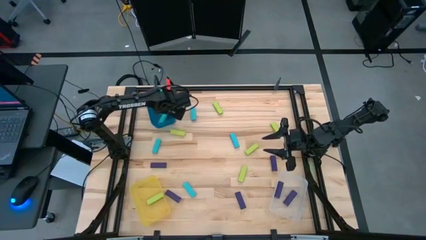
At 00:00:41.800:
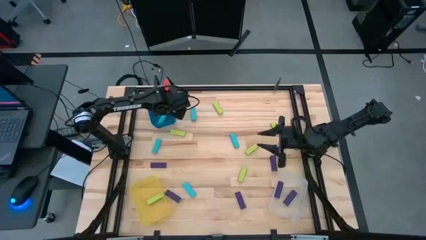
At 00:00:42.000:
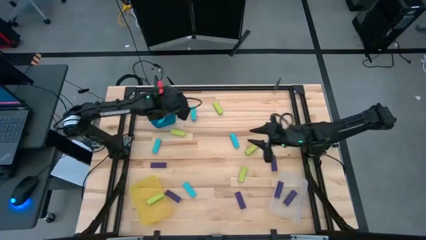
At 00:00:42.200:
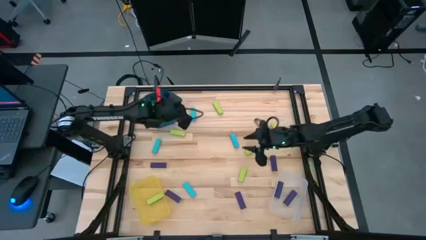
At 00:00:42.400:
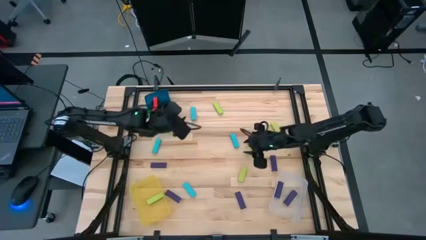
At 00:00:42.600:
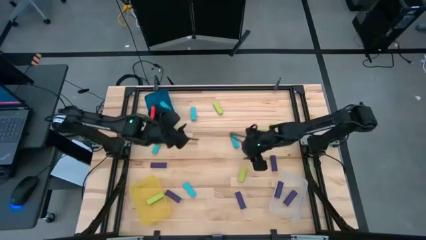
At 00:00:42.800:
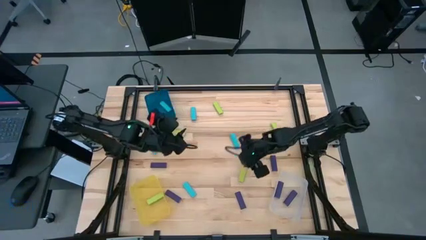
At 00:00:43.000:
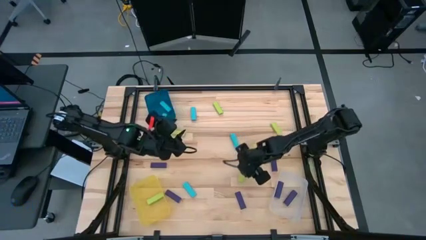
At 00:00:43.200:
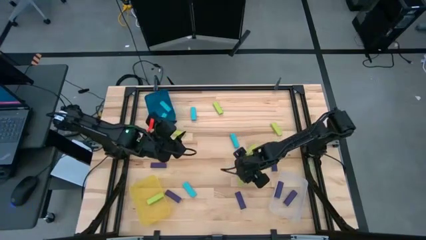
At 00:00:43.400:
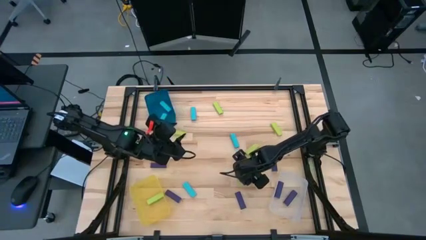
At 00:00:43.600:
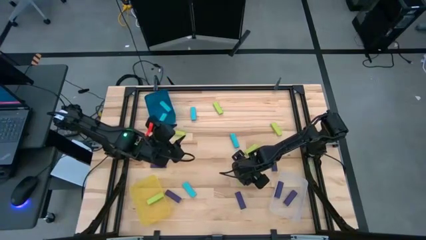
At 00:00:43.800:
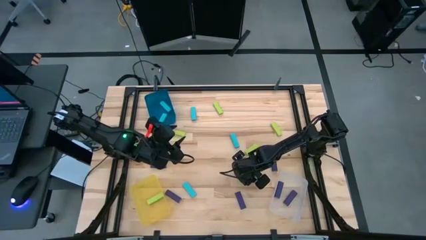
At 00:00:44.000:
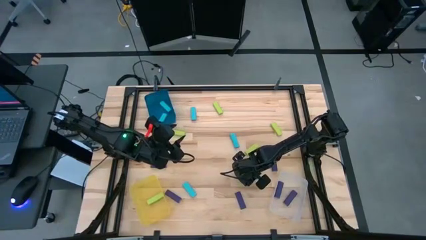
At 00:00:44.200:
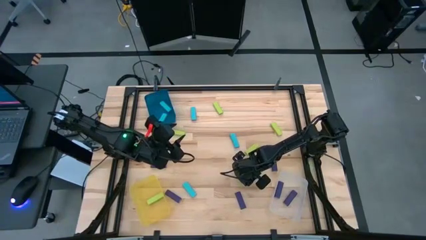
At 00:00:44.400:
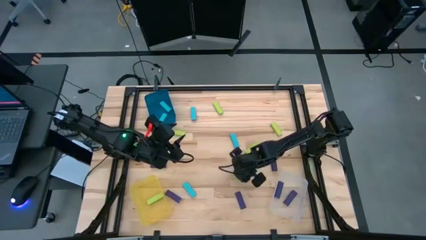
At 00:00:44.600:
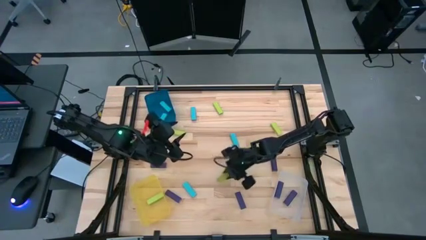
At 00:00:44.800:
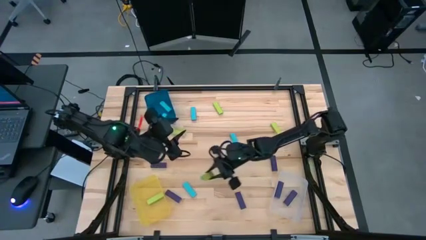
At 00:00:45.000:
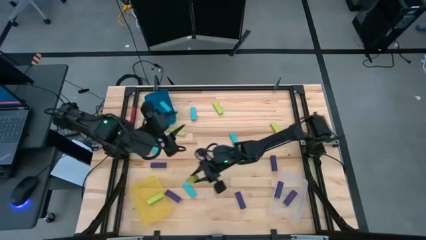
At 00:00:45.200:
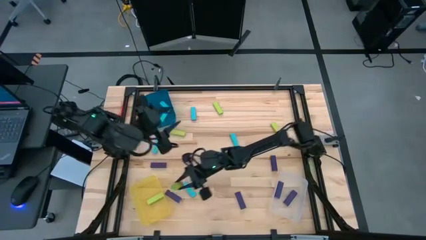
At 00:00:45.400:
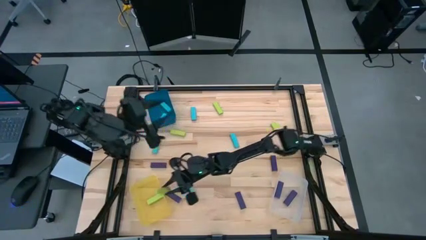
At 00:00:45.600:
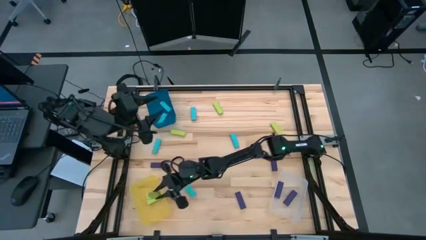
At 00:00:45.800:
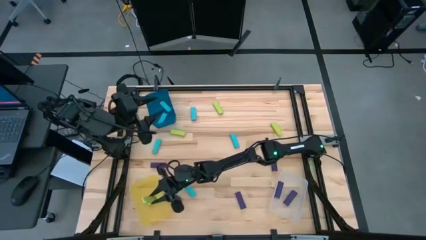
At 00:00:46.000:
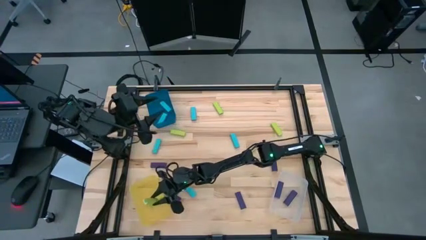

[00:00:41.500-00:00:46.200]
Task: Sort blocks
Put the green block into the yellow bin

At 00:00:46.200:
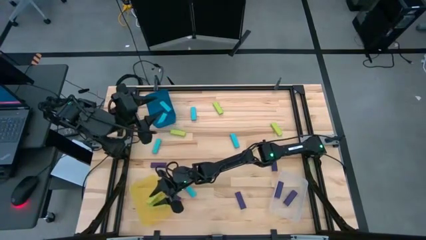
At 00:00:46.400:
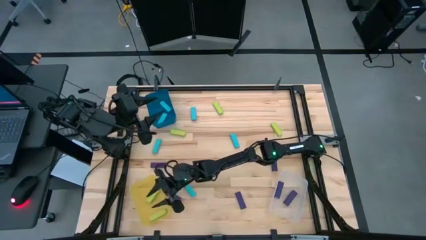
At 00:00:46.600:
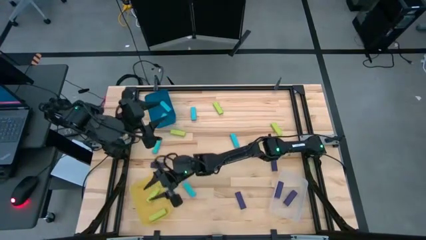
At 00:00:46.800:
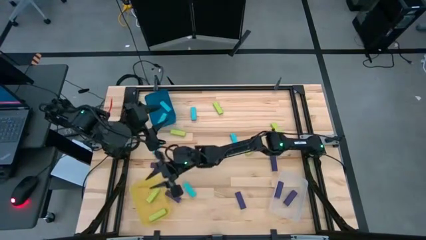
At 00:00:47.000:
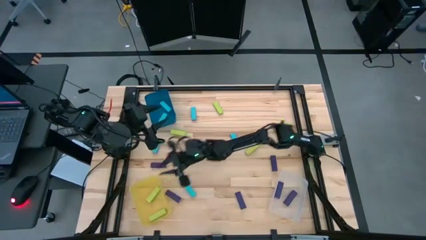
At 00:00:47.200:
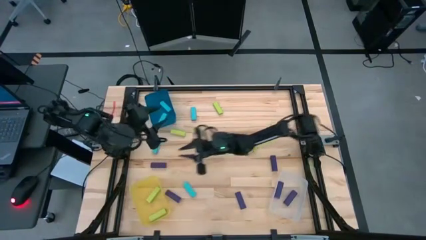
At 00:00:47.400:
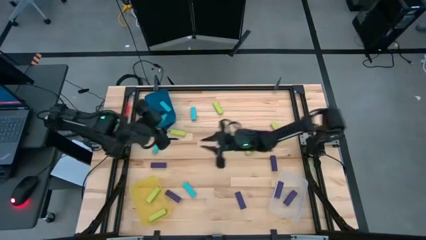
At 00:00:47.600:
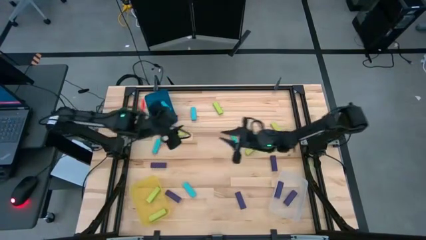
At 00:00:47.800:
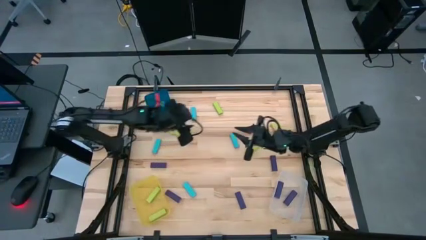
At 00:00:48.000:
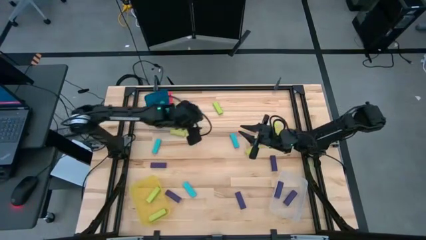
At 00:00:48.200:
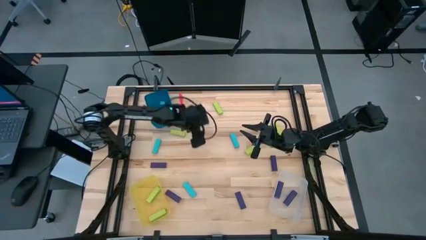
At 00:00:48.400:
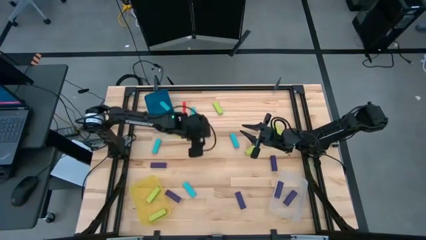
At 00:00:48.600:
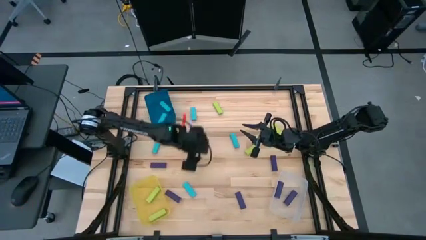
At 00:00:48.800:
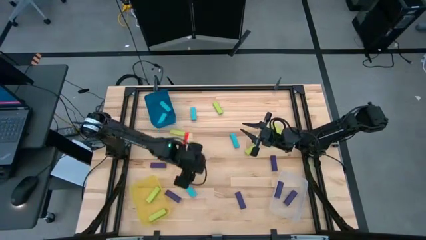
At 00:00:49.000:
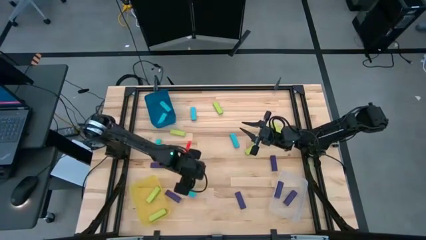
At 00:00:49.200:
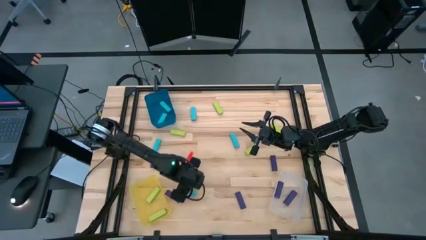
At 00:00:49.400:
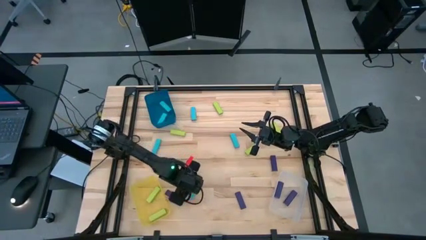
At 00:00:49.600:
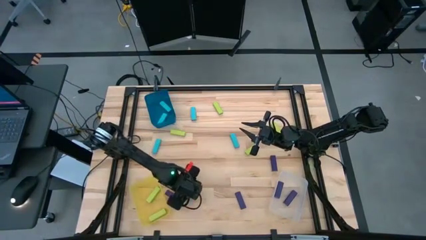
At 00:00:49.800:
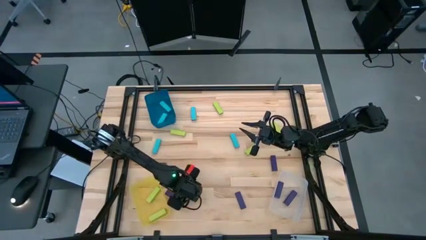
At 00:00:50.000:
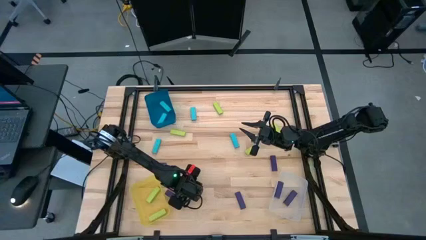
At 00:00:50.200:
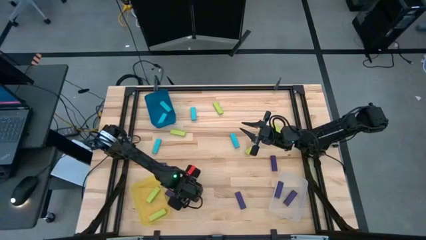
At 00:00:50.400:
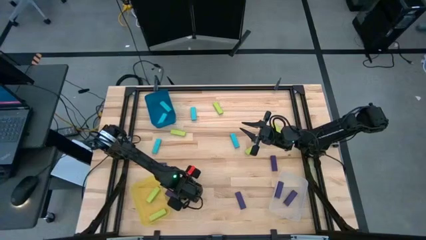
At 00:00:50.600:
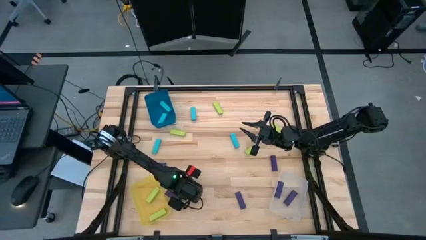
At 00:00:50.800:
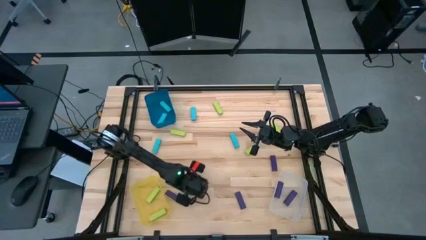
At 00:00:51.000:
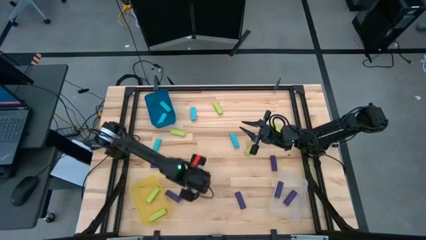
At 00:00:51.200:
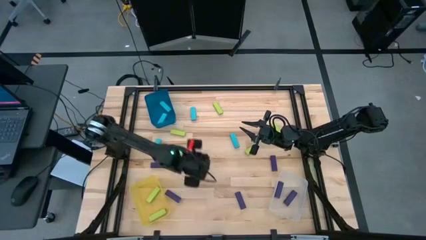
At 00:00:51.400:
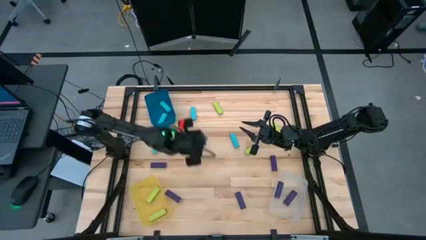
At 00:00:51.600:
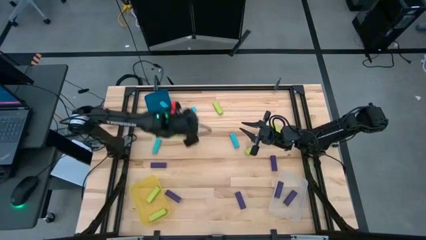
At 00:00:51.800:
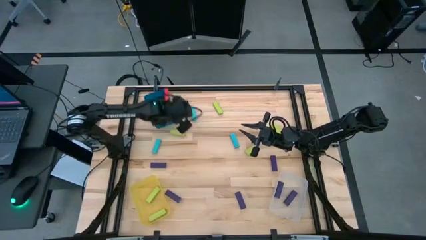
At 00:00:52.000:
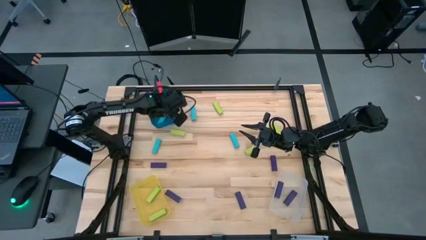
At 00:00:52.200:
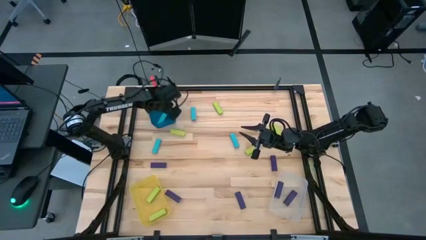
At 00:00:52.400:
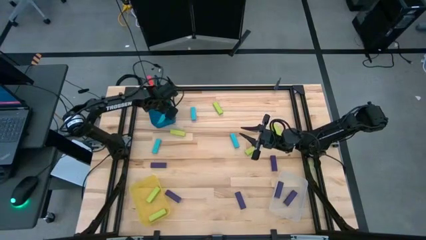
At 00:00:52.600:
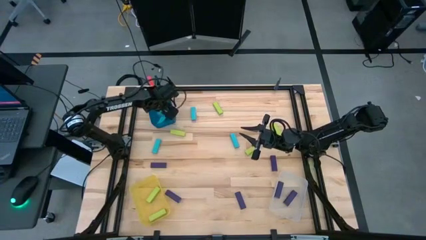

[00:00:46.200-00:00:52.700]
Put the blue block into the blue bin

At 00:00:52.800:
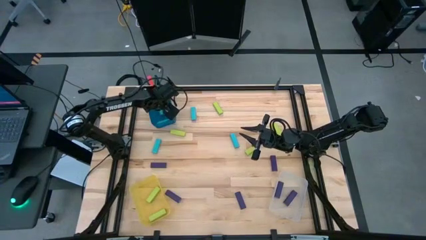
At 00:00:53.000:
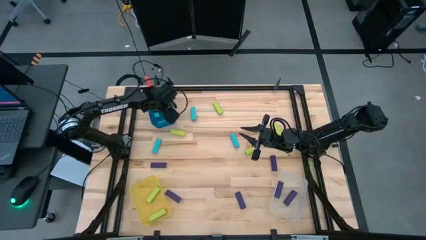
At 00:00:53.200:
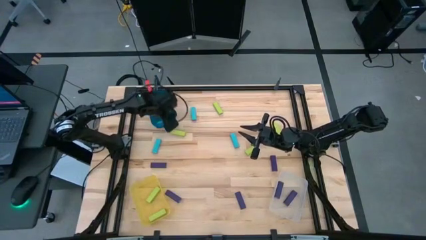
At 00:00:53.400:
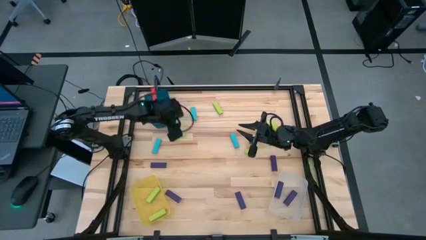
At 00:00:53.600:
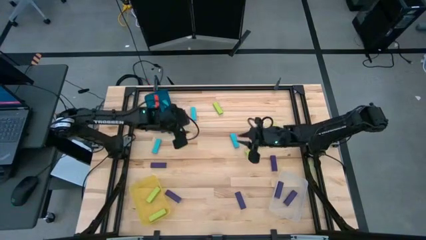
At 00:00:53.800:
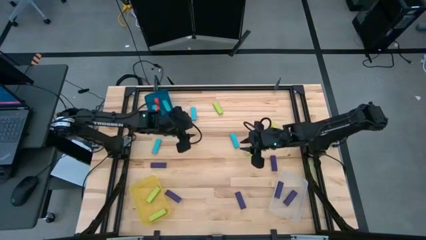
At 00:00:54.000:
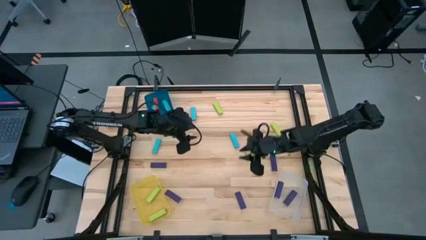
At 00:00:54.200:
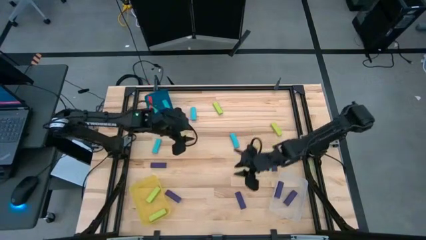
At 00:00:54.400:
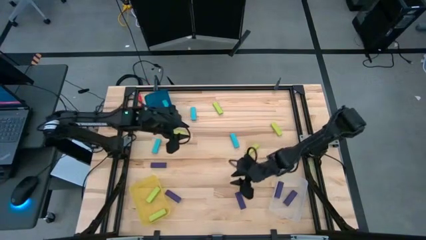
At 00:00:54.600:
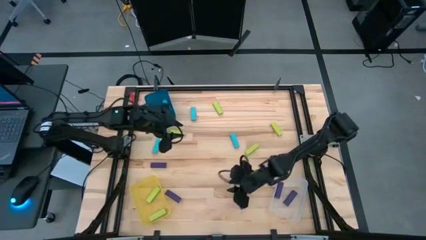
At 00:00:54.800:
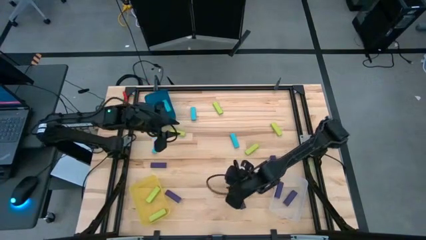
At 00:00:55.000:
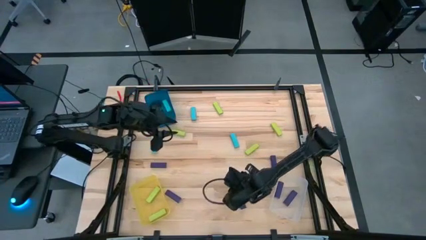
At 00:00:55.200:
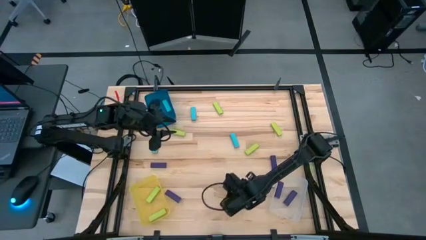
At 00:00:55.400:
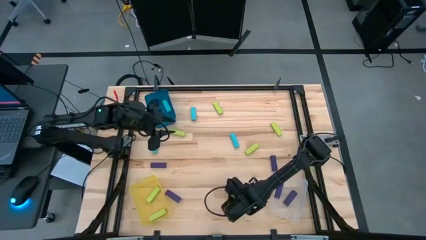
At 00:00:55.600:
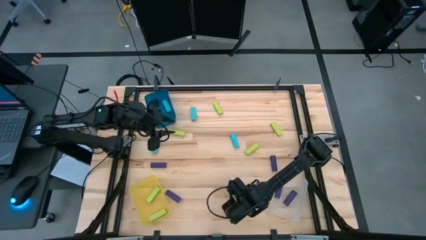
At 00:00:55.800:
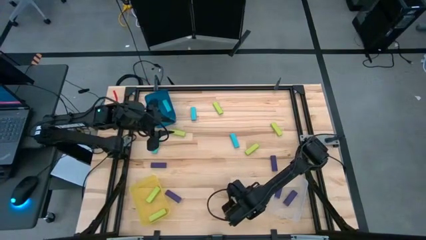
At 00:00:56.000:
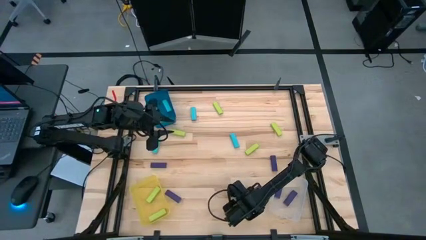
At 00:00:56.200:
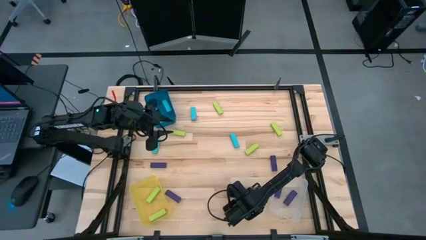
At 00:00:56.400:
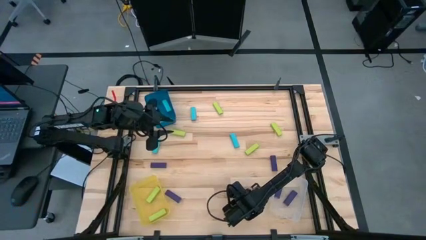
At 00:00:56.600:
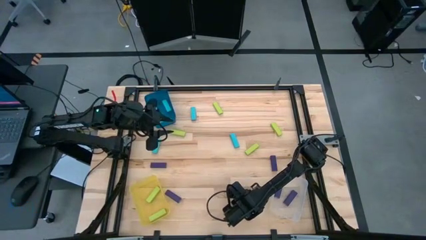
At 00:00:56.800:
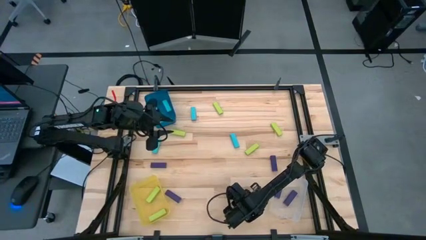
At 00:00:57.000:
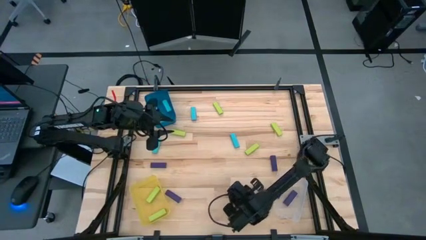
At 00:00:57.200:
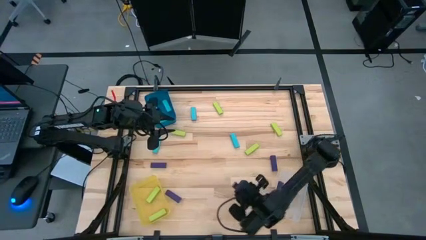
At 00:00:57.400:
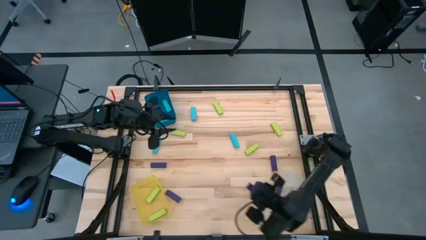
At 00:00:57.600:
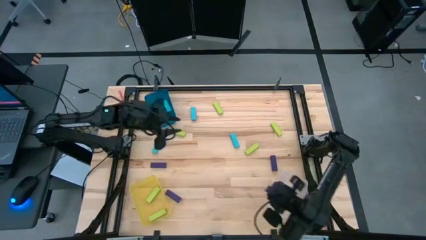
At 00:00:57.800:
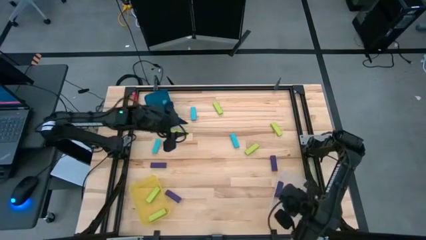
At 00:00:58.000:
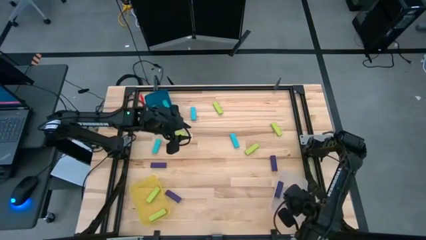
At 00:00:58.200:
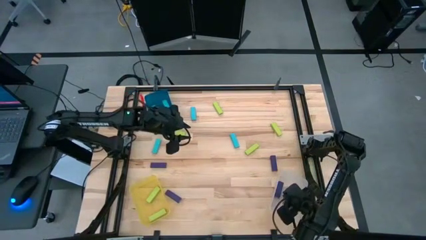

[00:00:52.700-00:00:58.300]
Put the purple block into the transparent bin
